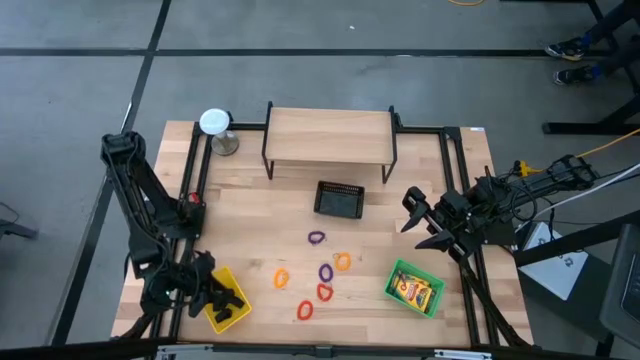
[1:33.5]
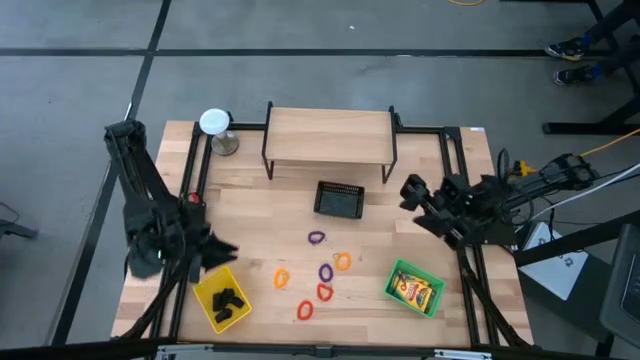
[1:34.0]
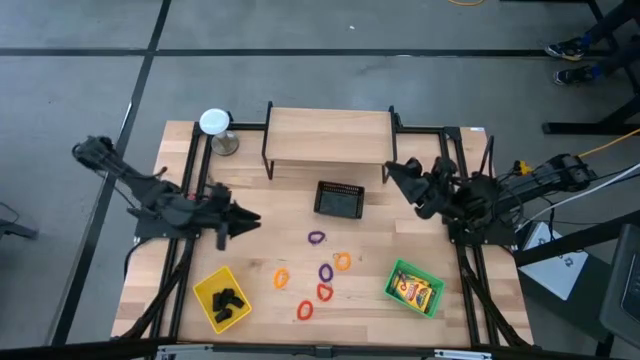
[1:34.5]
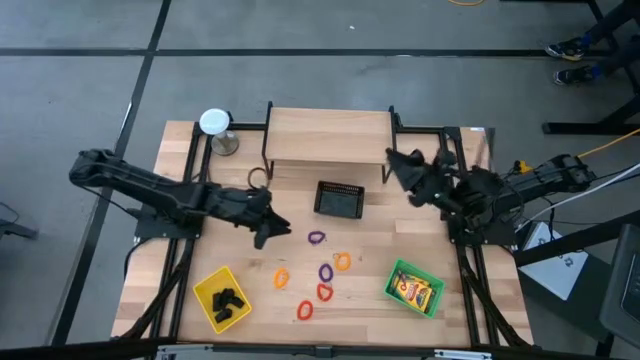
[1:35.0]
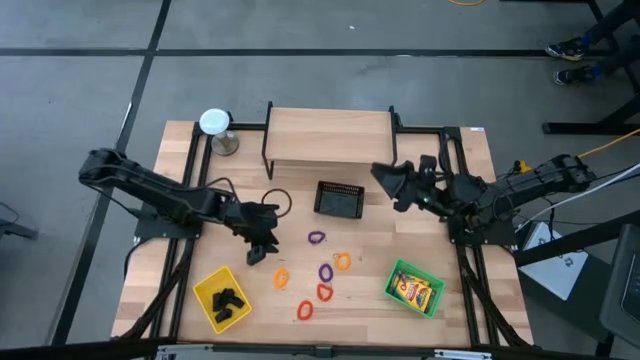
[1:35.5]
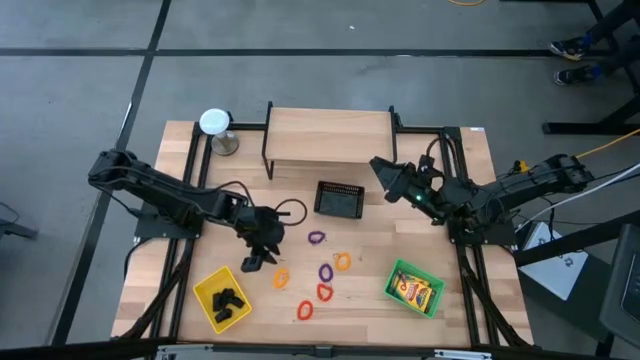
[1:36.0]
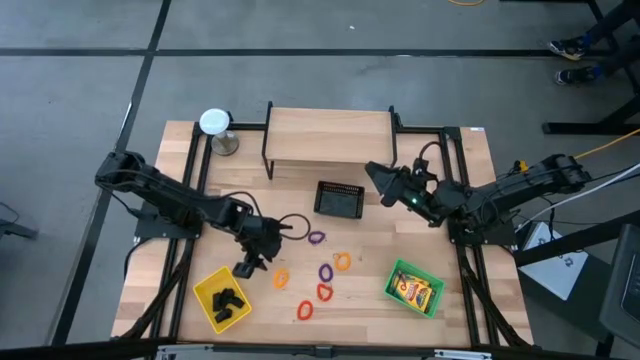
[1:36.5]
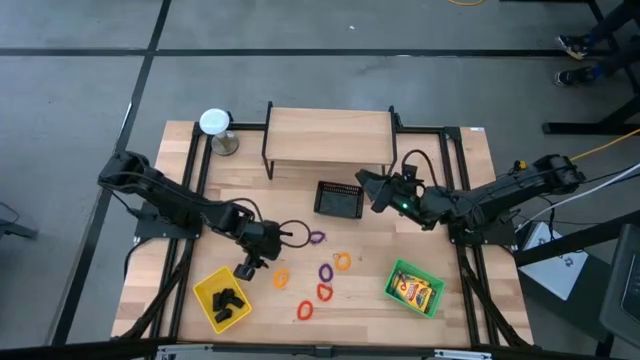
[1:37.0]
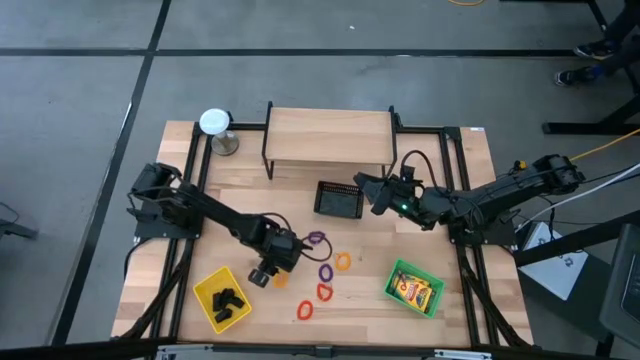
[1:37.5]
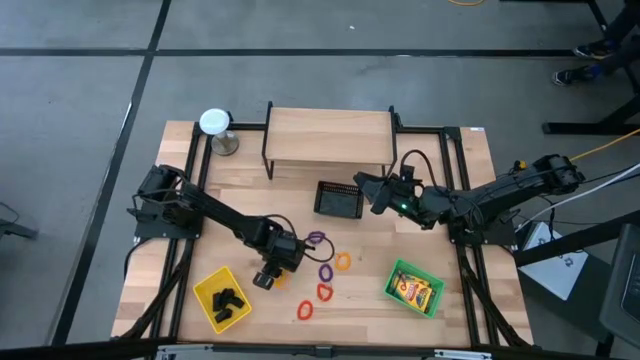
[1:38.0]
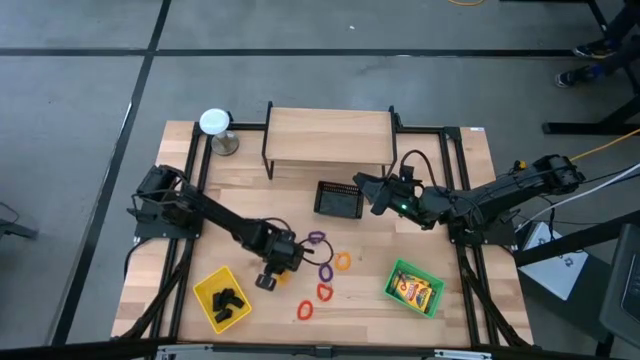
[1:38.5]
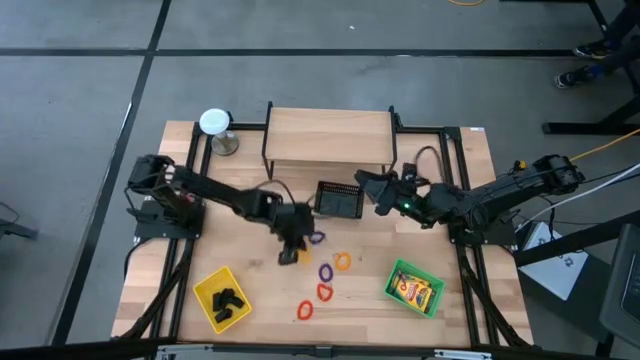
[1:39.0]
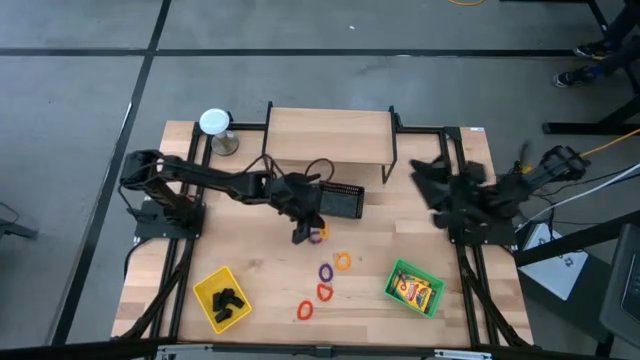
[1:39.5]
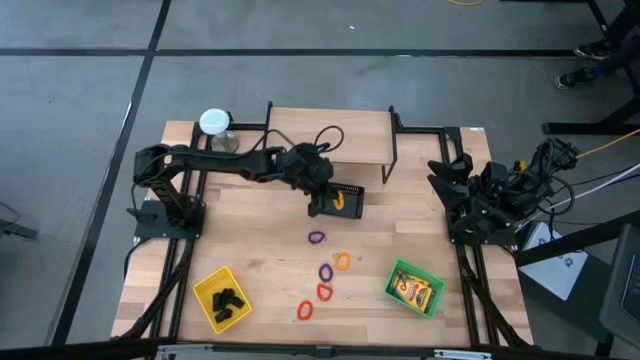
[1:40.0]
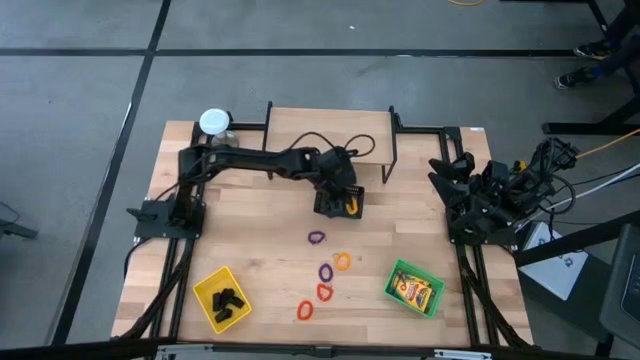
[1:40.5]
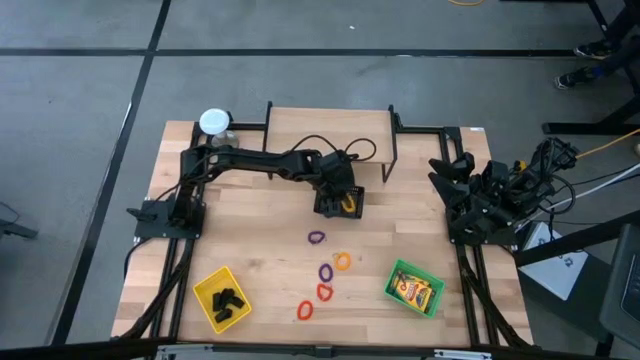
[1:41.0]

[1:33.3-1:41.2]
Task: Pick & Place Office Desk Supplies
Put the left yellow spring keychain into the black basket

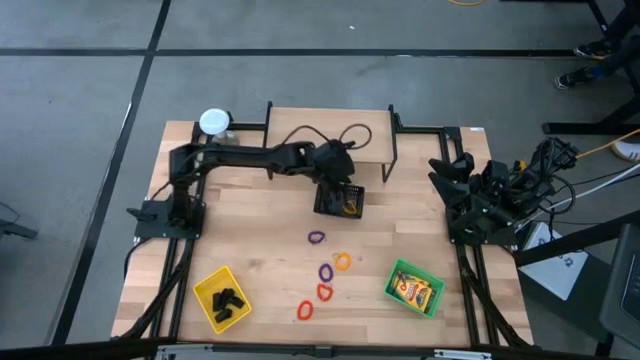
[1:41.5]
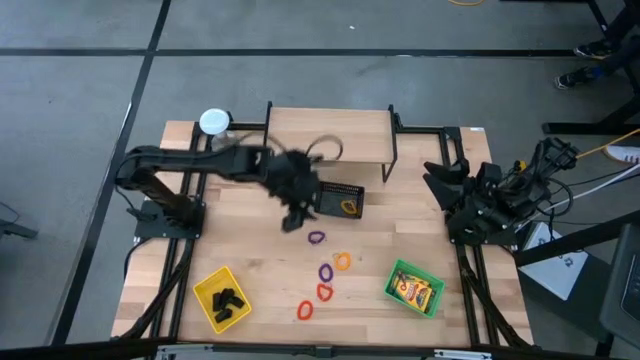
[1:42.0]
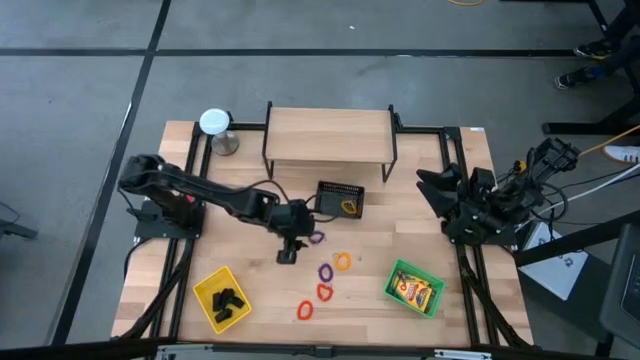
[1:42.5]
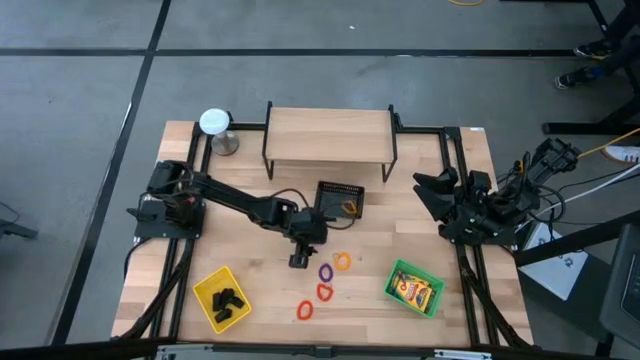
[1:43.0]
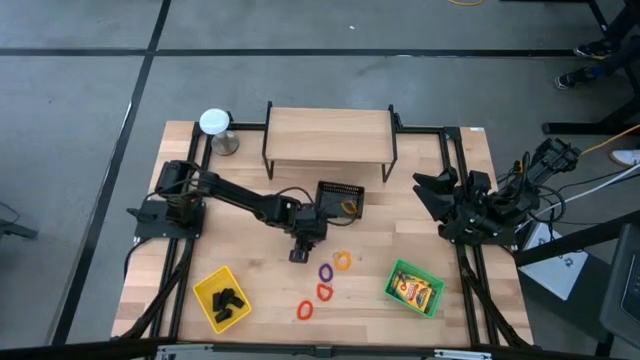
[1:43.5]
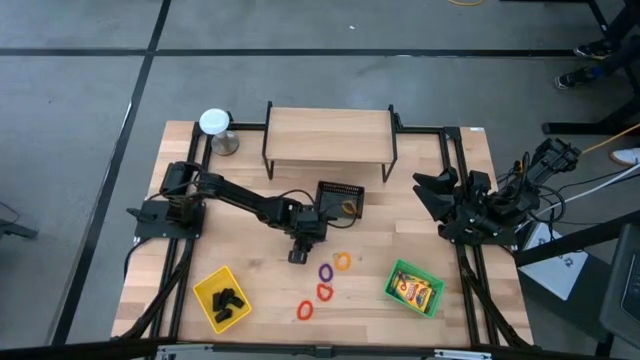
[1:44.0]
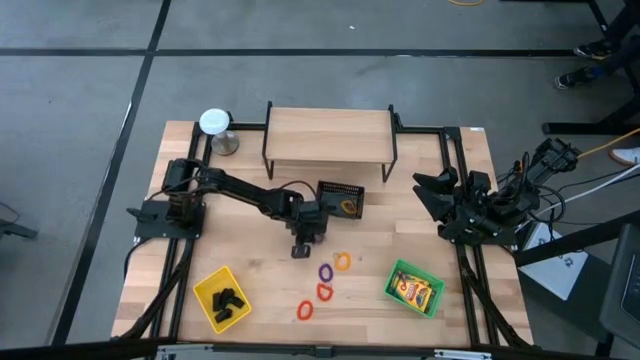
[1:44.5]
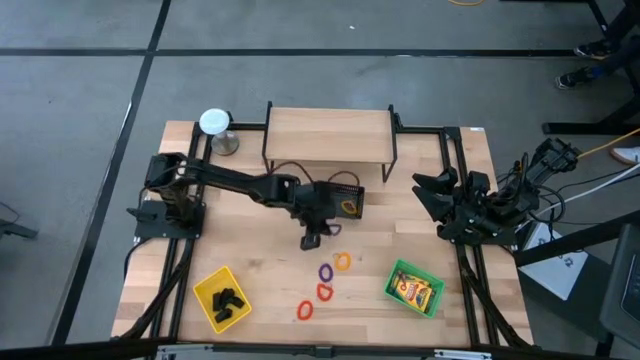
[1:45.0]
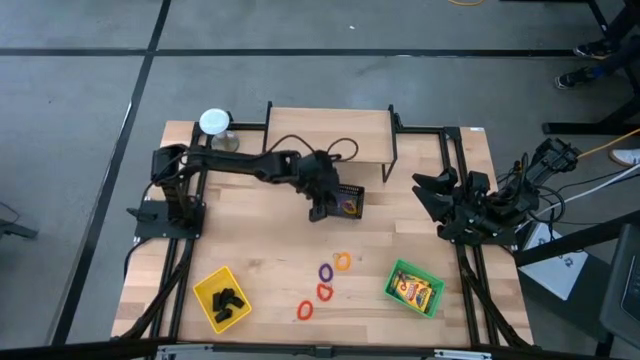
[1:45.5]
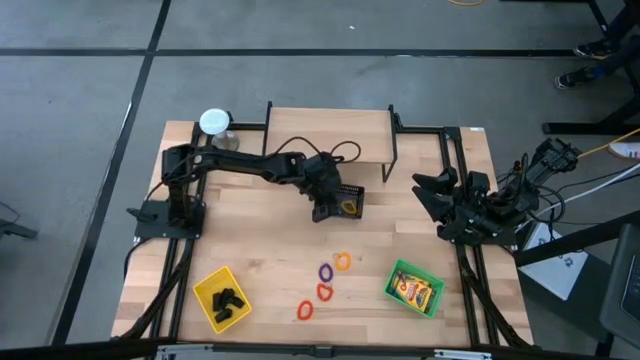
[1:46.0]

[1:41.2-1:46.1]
Put the top purple spring keychain into the black basket

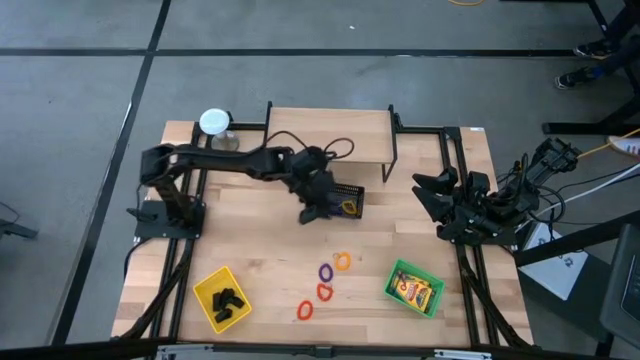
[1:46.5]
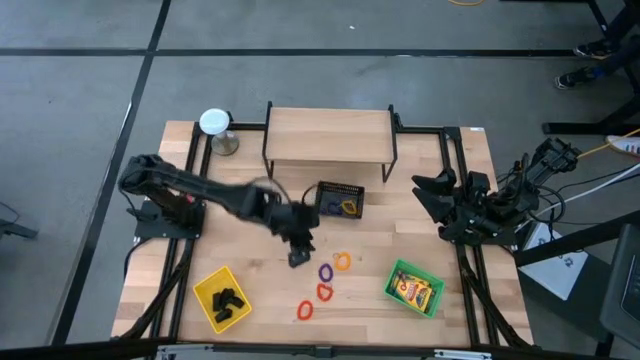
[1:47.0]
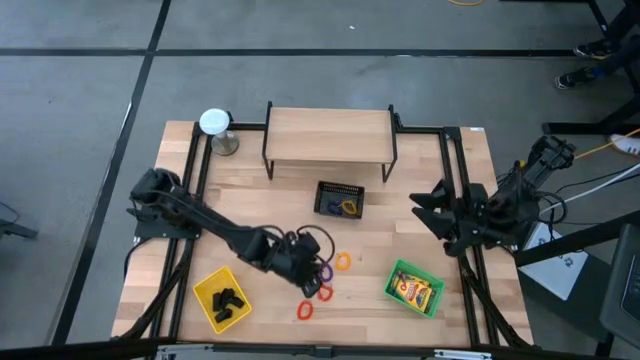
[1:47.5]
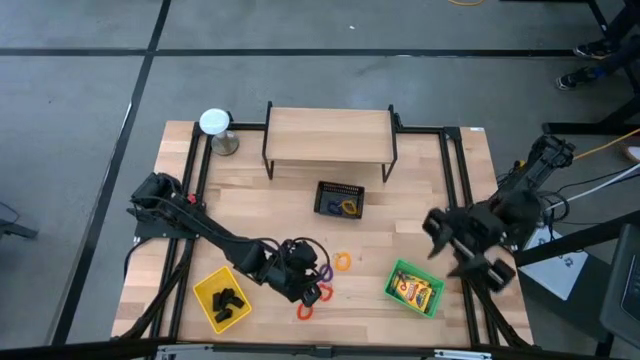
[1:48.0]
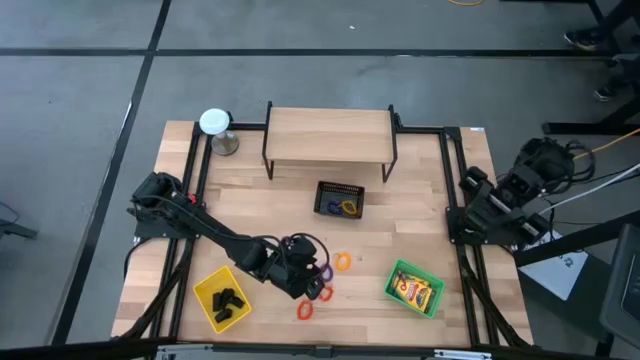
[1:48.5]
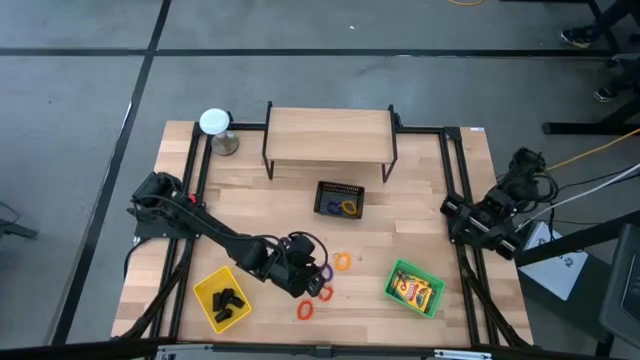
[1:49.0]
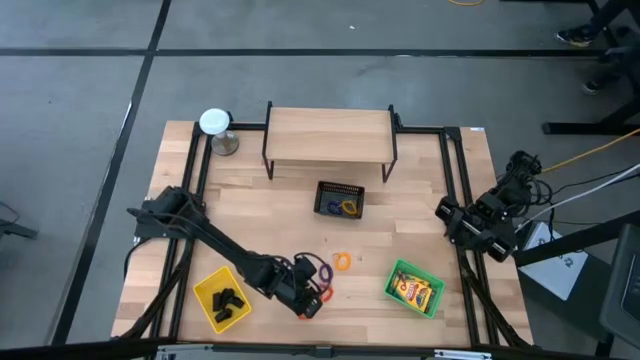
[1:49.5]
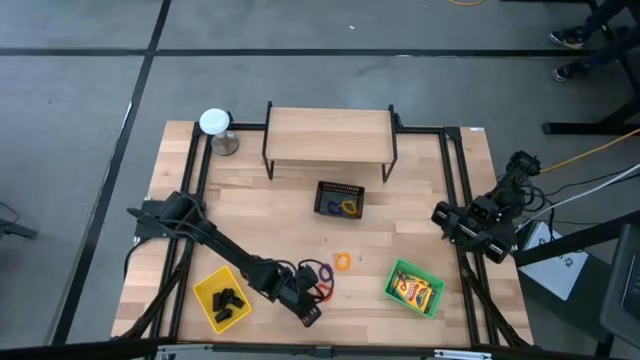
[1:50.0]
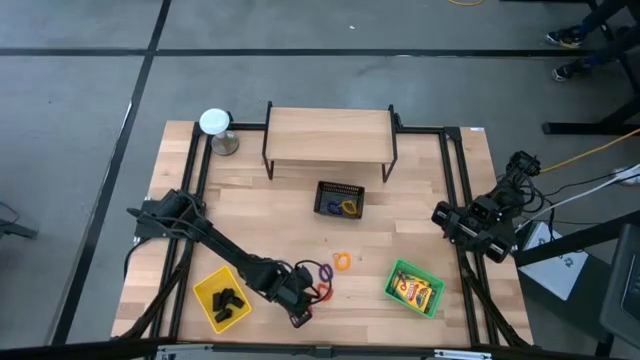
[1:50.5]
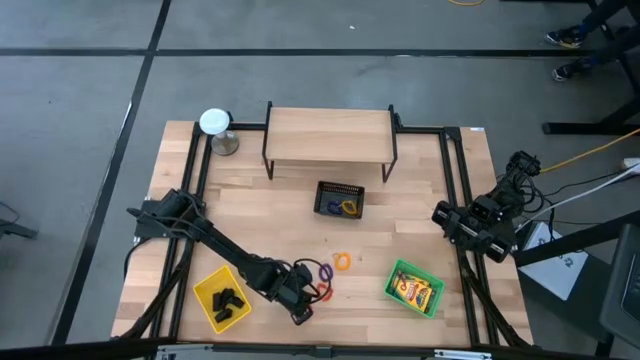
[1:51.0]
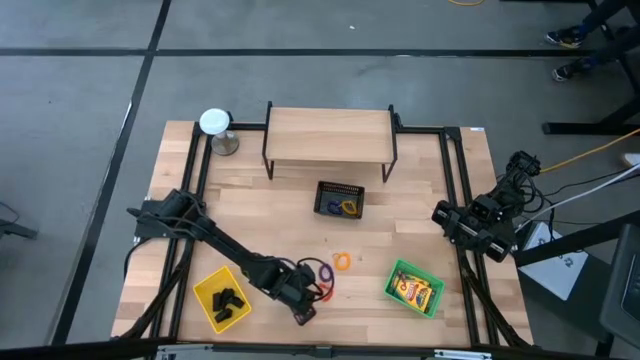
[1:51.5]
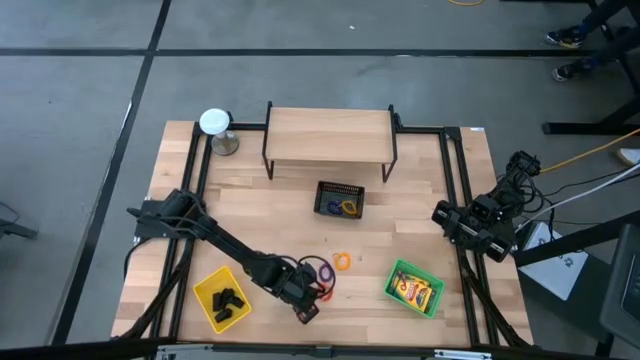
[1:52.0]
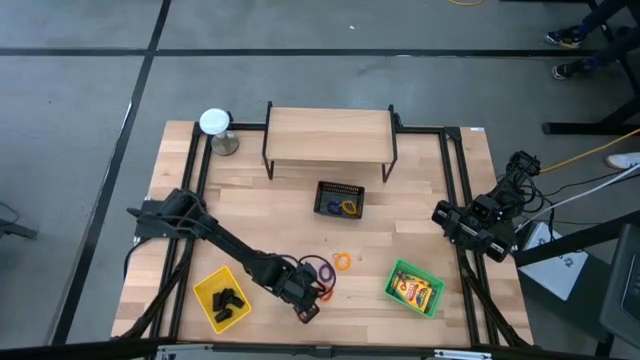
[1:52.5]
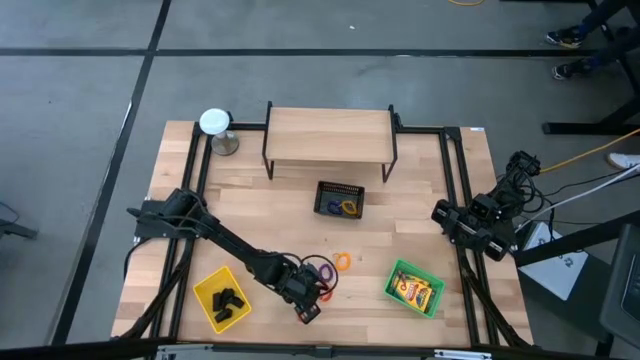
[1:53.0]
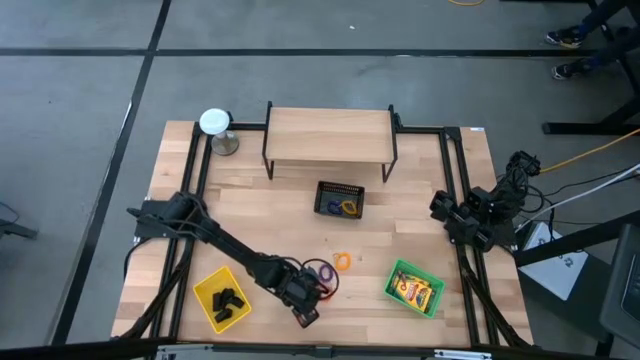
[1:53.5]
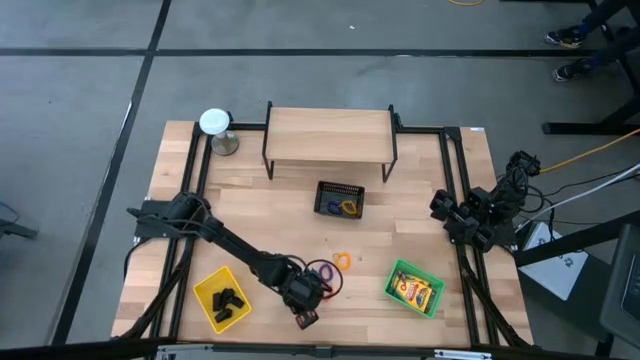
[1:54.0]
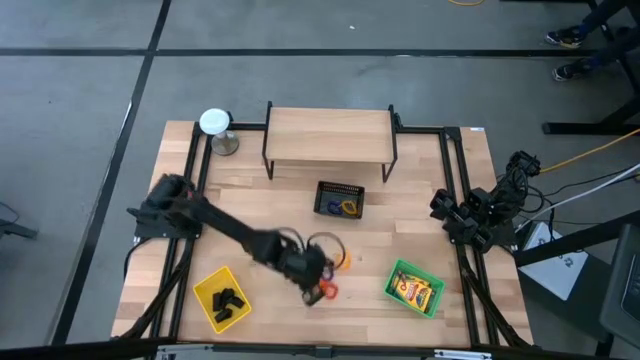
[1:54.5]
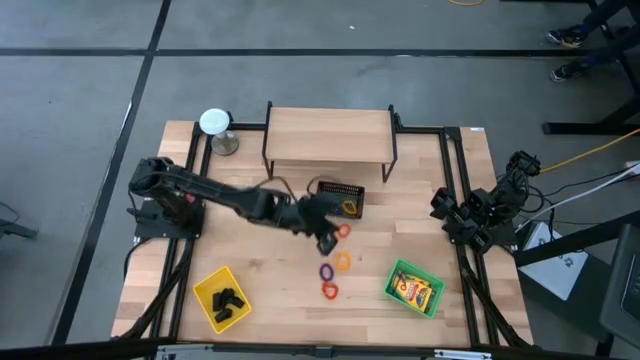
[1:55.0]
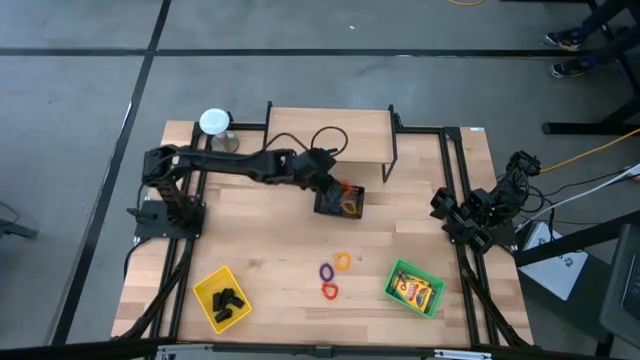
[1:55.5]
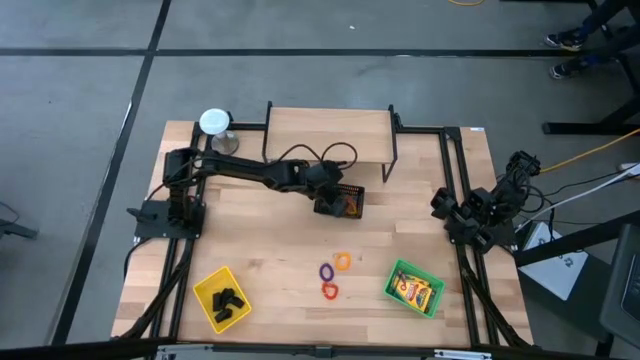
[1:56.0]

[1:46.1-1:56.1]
Put the bottom orange spring keychain into the black basket
